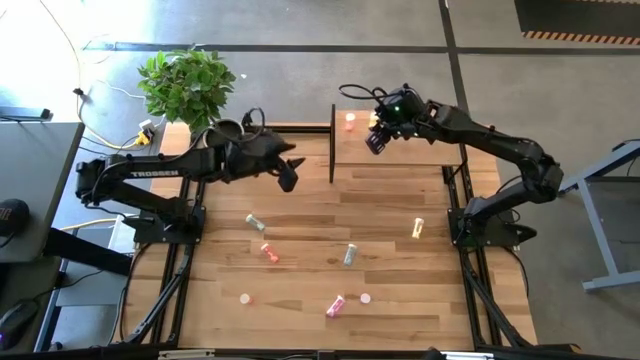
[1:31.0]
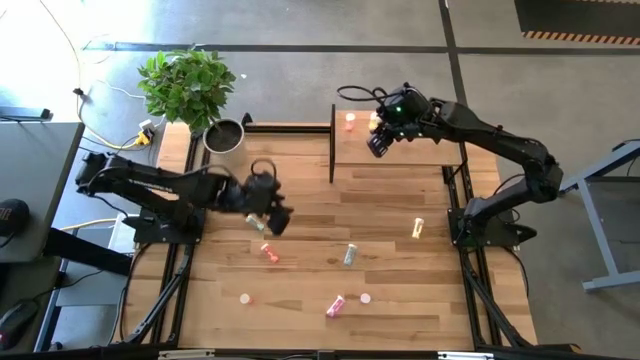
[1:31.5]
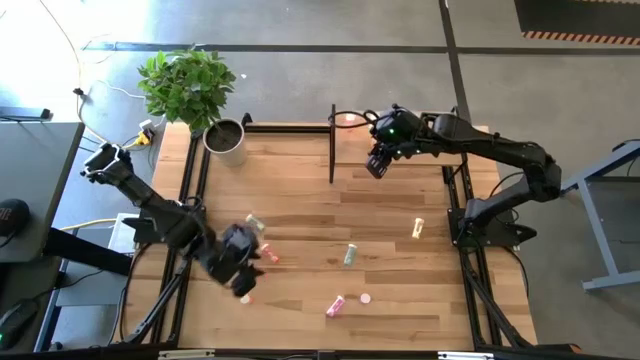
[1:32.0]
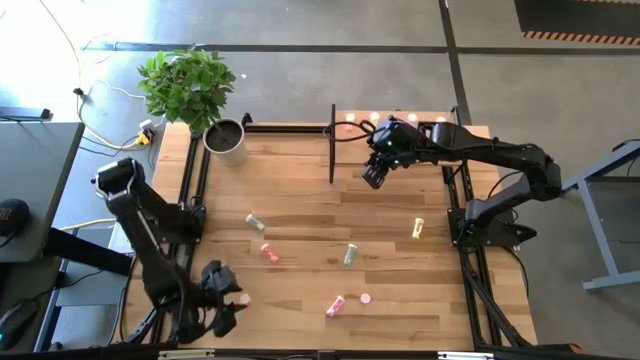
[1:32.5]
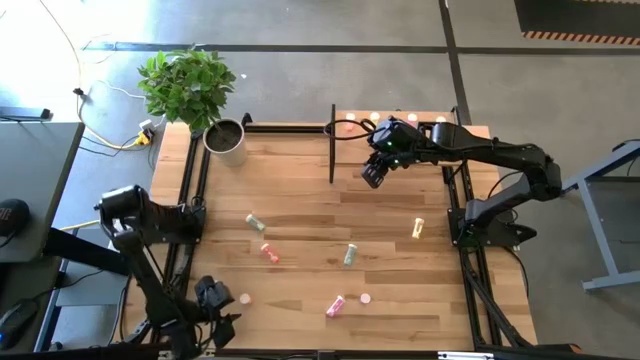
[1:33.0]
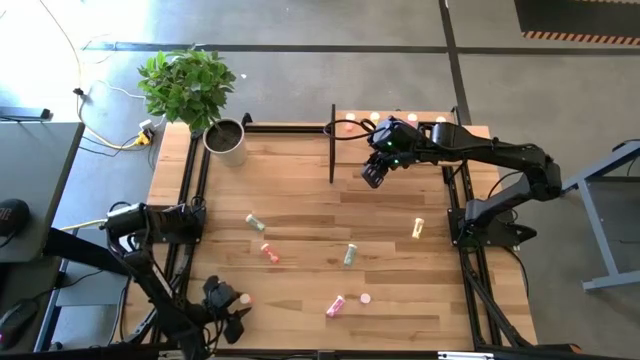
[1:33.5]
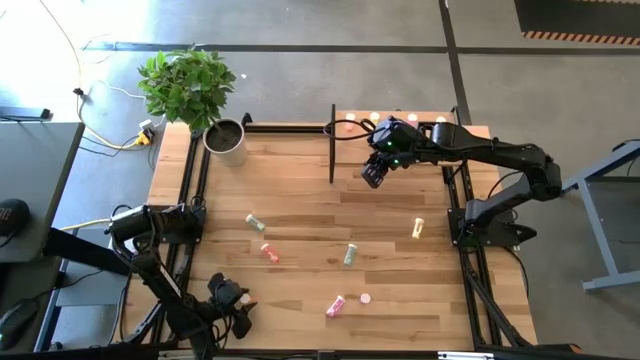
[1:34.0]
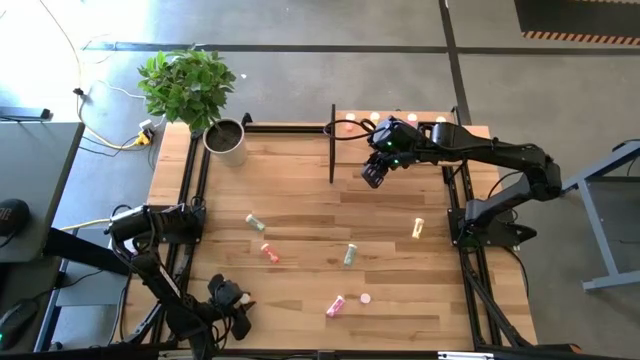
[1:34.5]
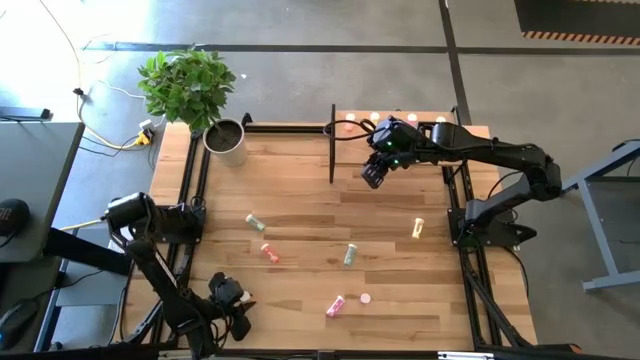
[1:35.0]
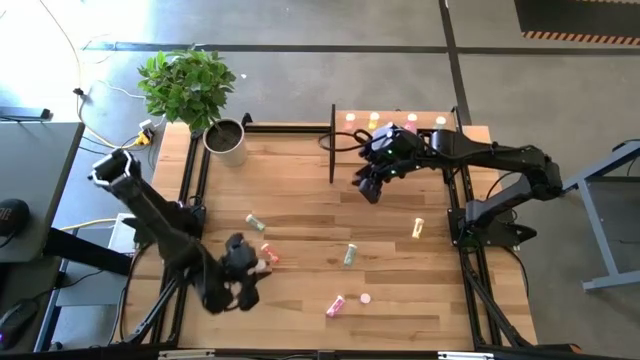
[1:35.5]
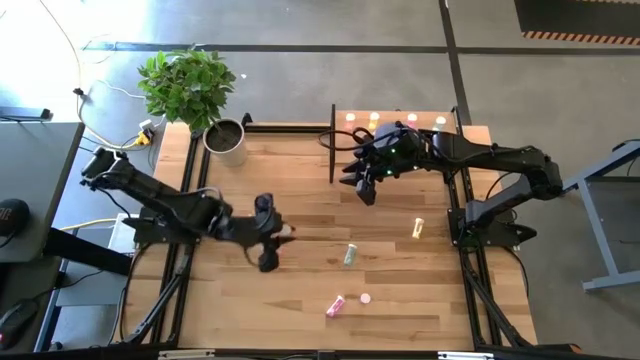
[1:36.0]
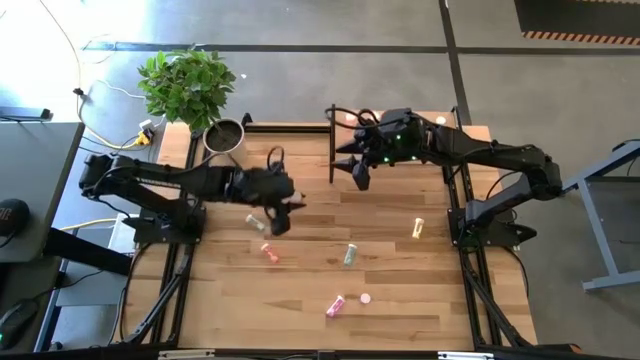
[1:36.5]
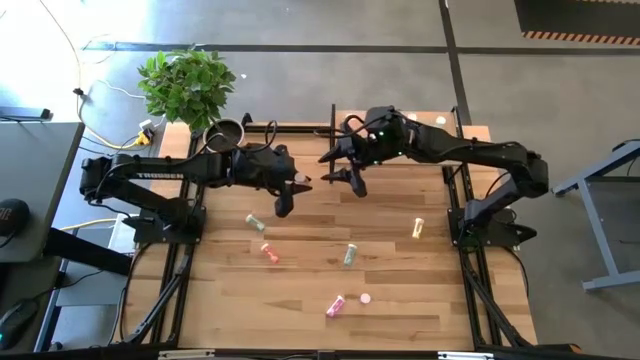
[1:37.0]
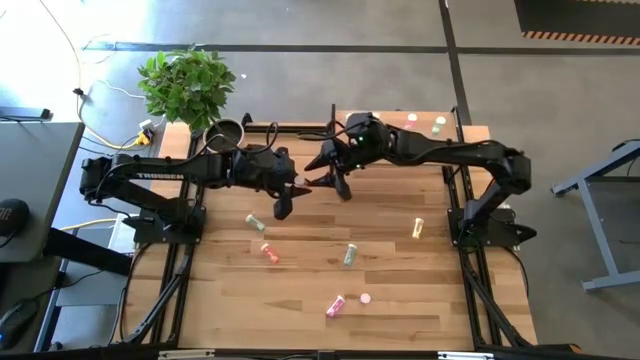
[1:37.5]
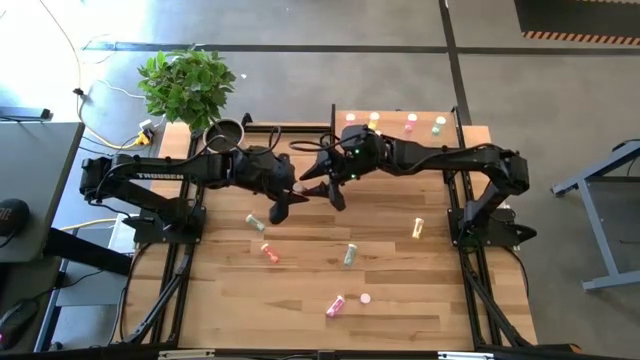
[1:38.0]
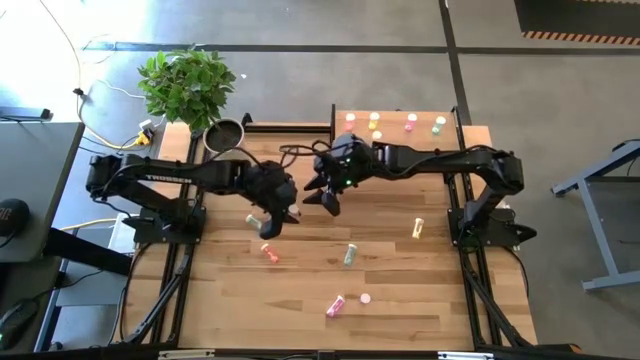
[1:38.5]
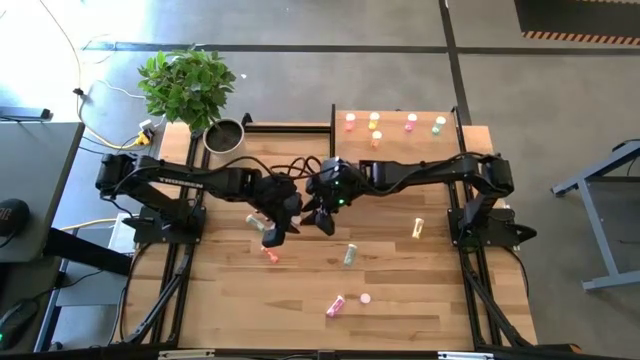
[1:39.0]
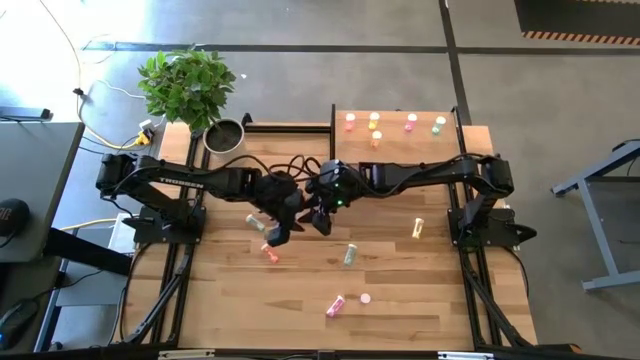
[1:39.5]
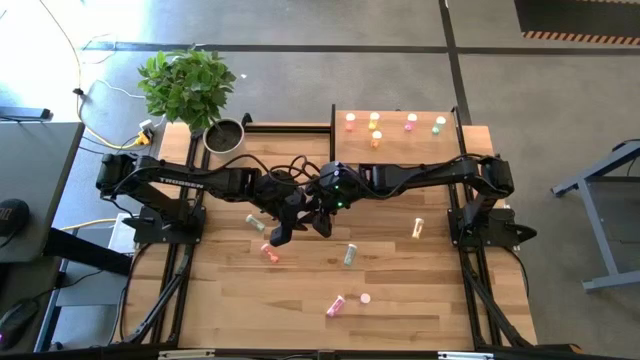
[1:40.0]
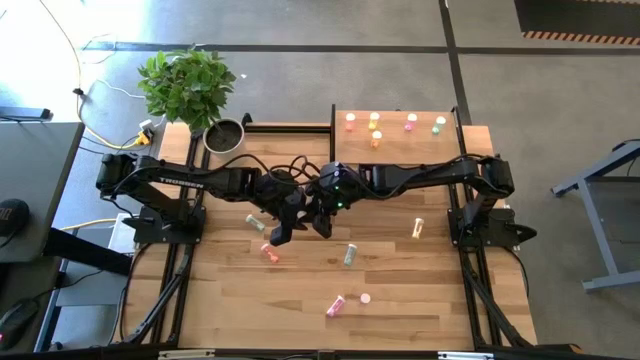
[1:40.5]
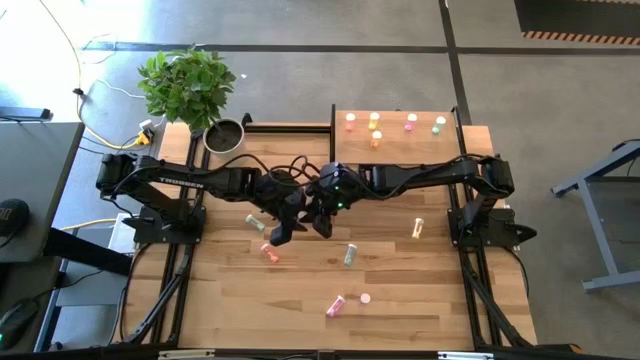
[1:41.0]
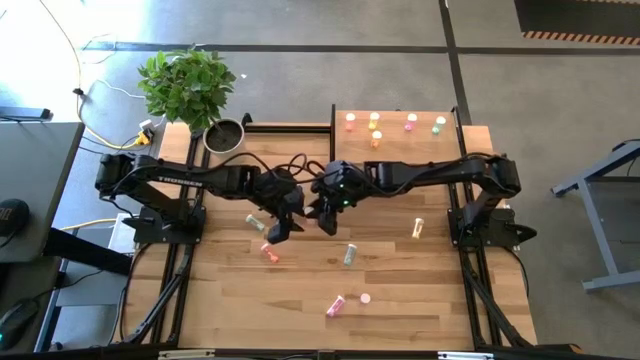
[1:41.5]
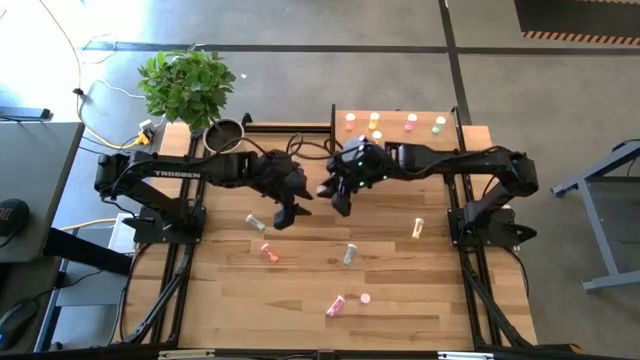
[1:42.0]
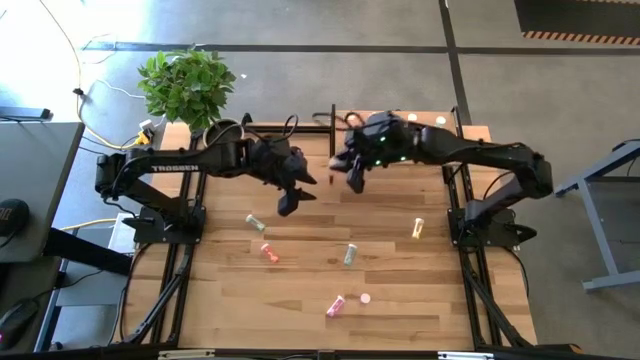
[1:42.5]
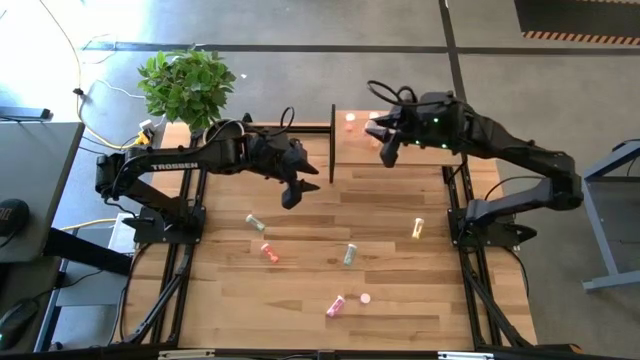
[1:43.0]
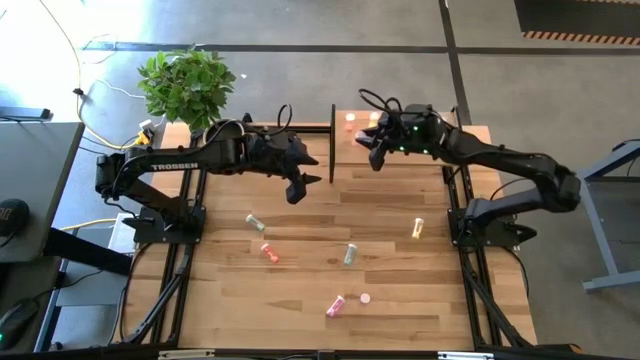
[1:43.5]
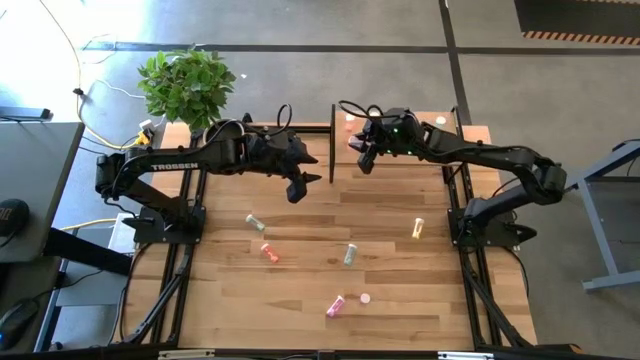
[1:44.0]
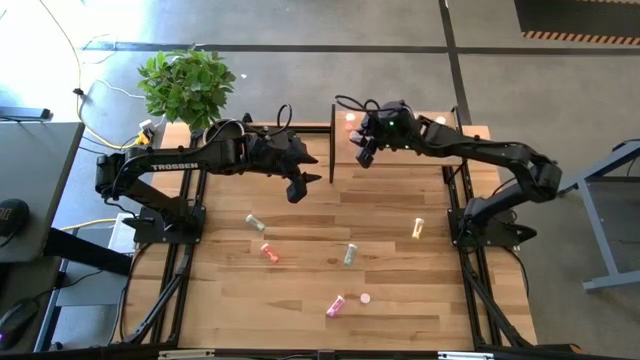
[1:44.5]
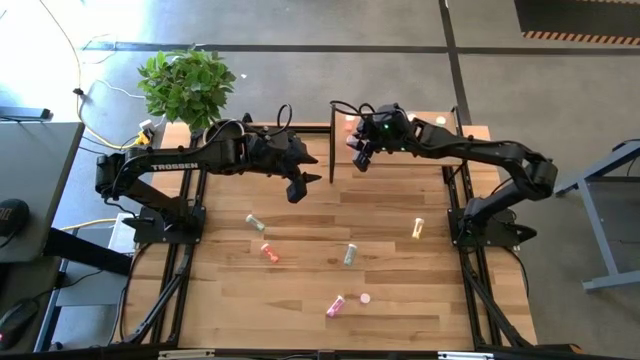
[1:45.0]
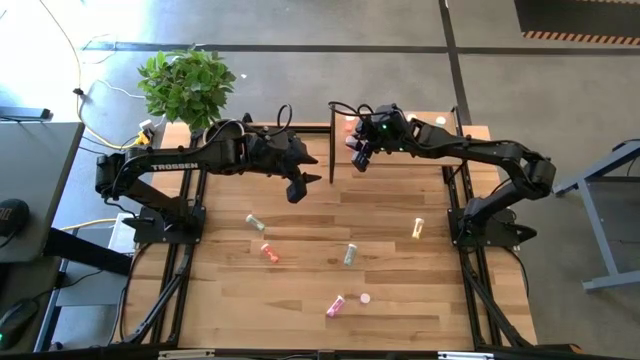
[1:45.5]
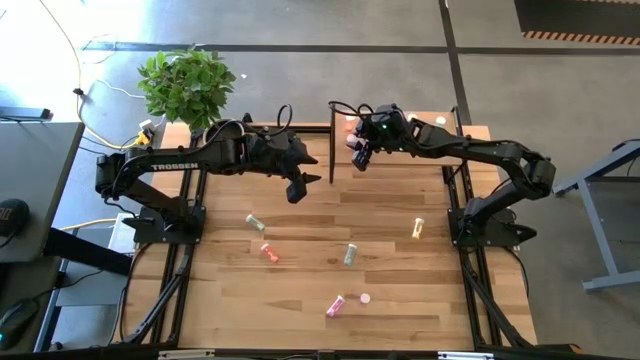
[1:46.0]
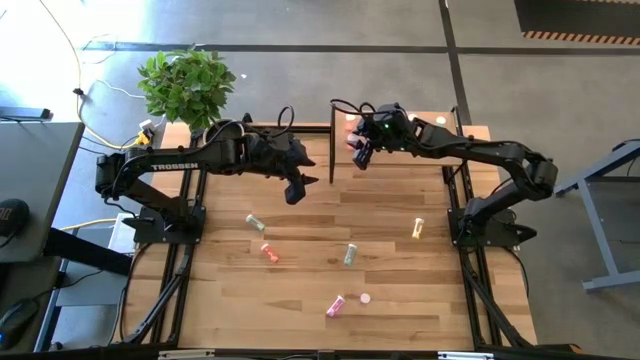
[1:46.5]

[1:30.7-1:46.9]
Task: Pick and place medicine bottles onto shelf by color
Put the bottom pink medicine bottle aligned with the other pink medicine bottle on the shelf

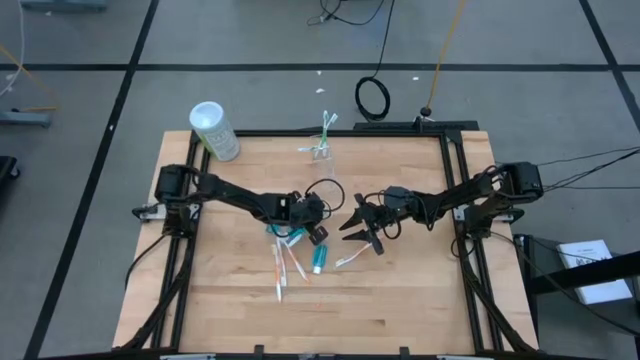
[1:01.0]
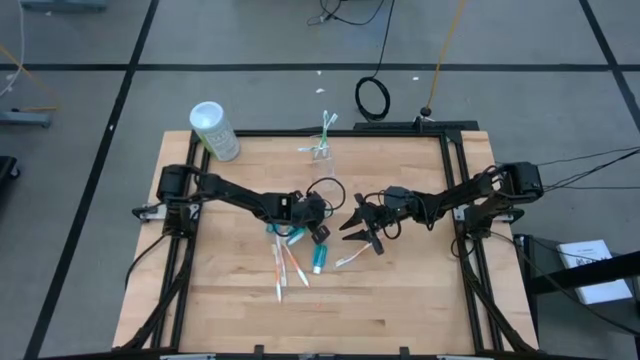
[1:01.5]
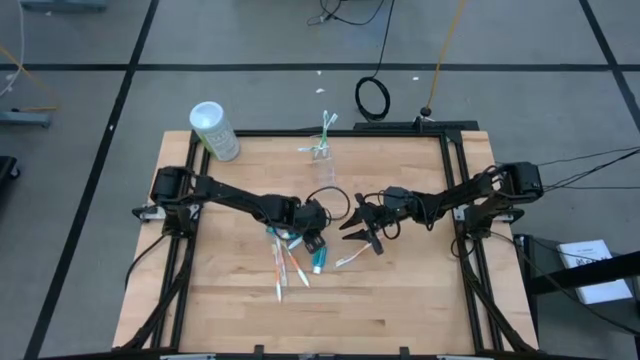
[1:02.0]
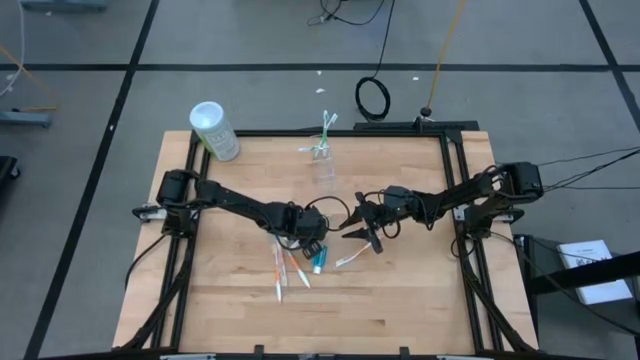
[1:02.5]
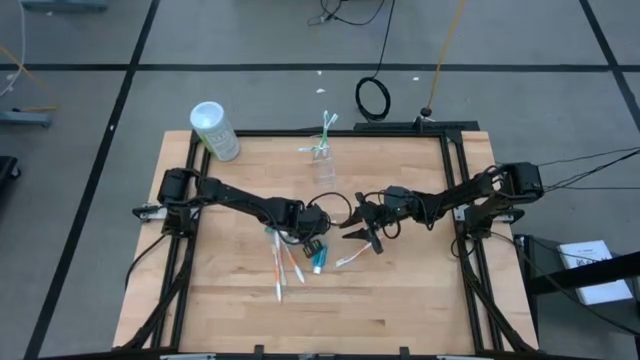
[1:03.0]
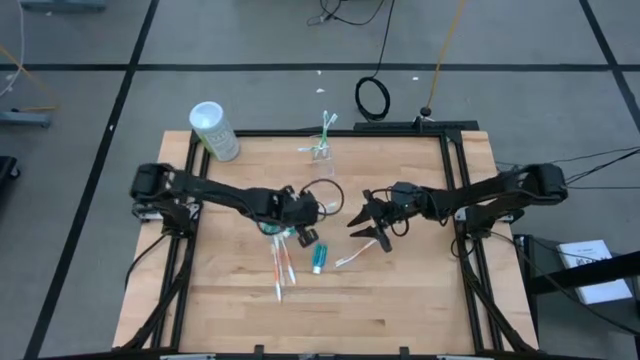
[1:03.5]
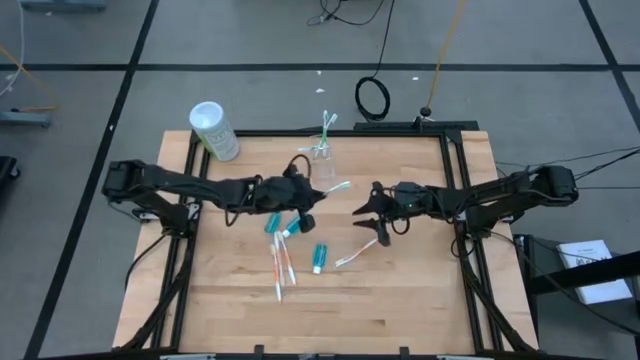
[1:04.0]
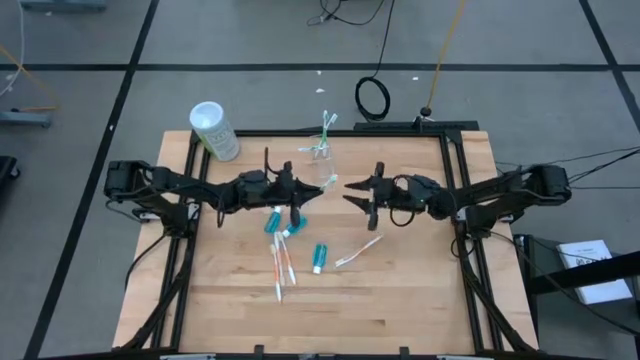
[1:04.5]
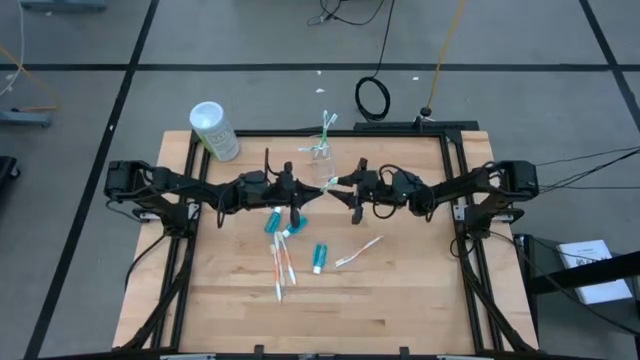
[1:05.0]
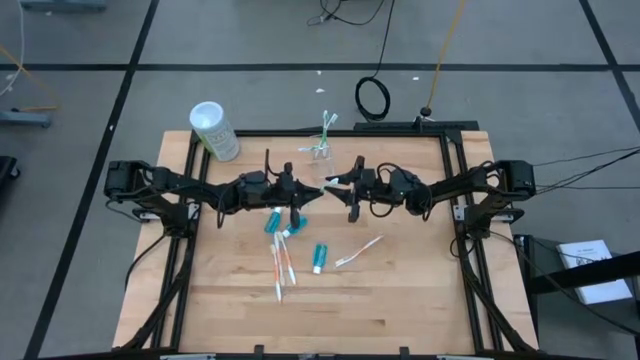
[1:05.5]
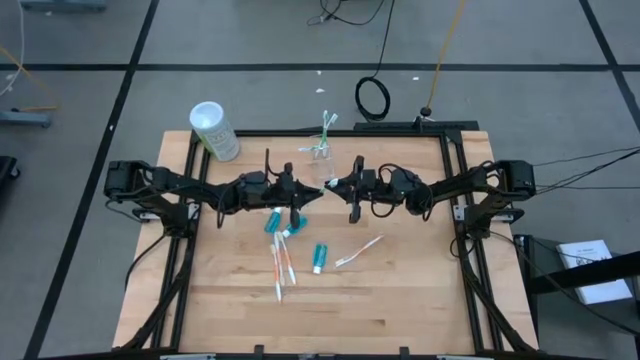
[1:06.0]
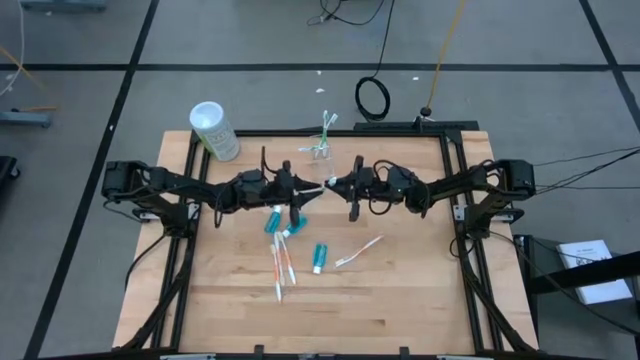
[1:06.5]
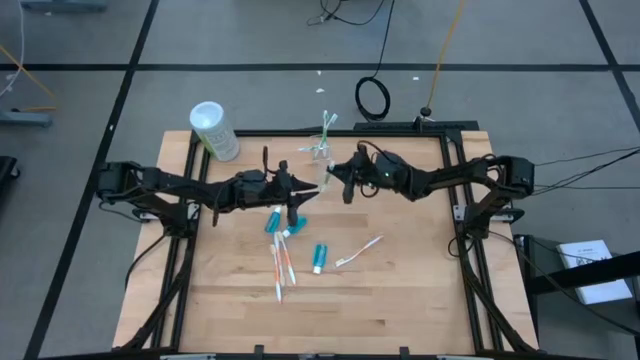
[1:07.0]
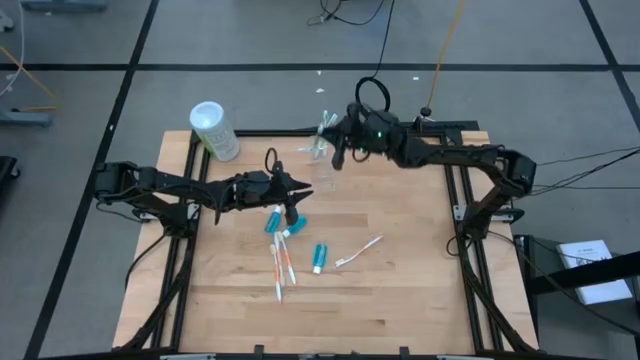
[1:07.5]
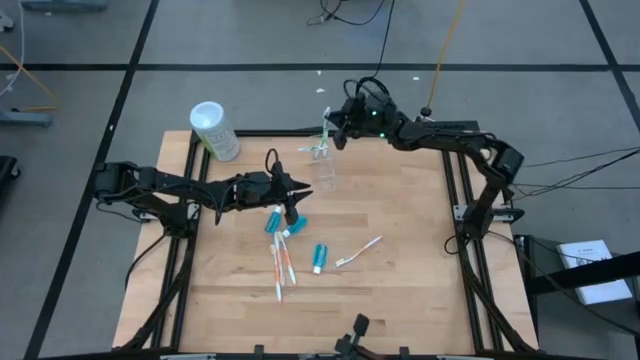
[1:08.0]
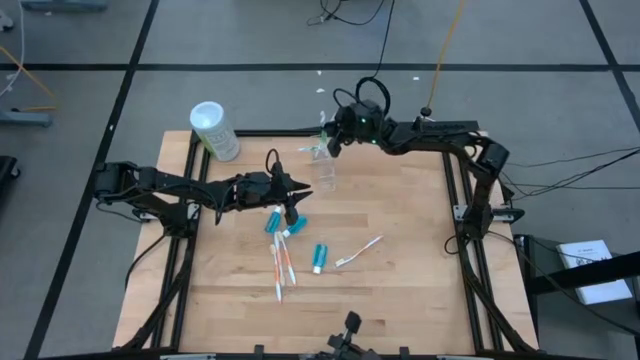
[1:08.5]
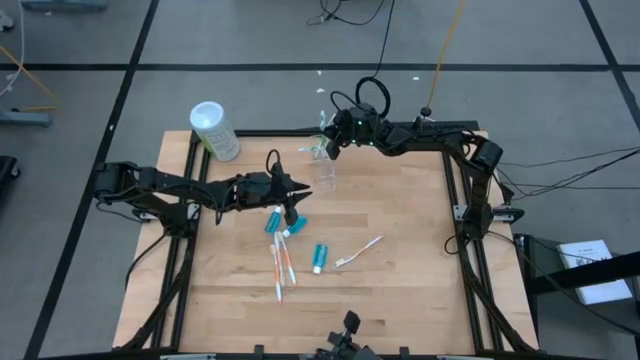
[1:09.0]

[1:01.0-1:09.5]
Task: Pick & Place toothbrushing station
Put the green toothbrush into the transparent organizer
